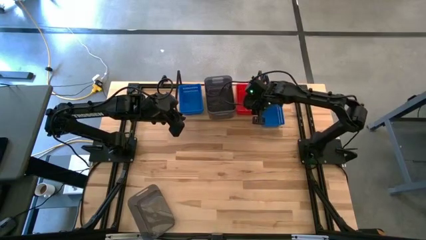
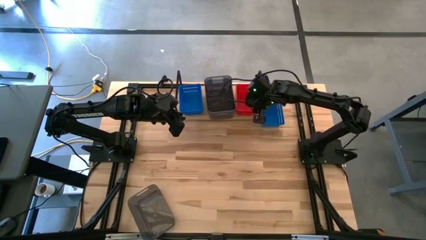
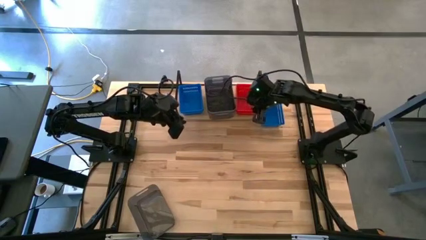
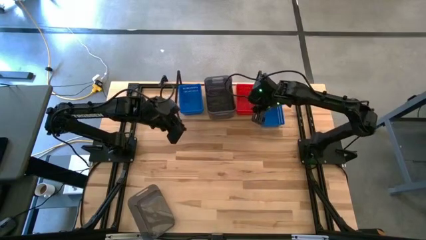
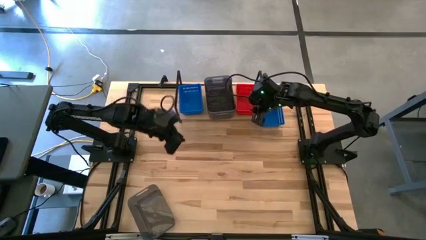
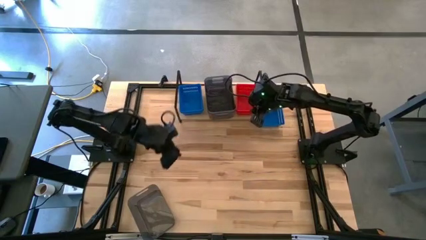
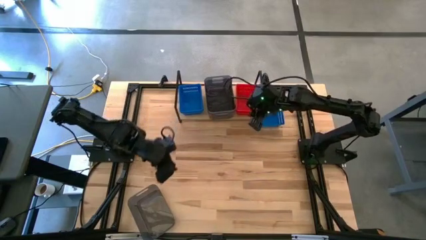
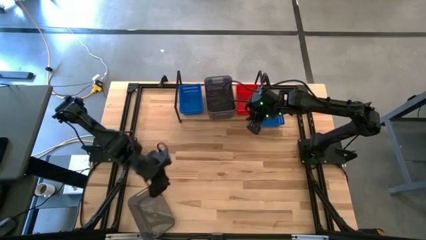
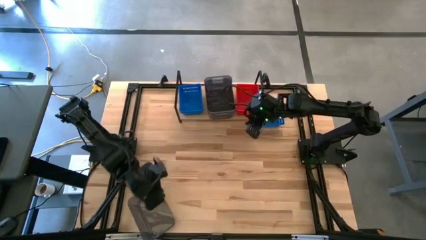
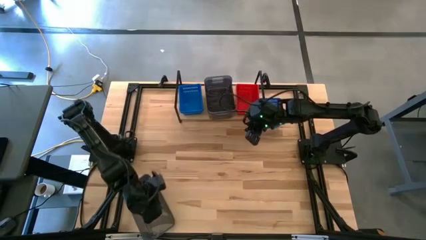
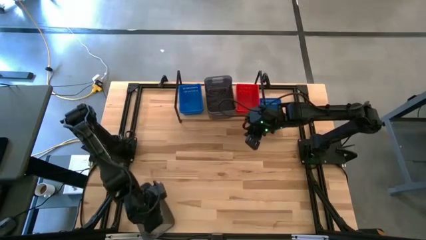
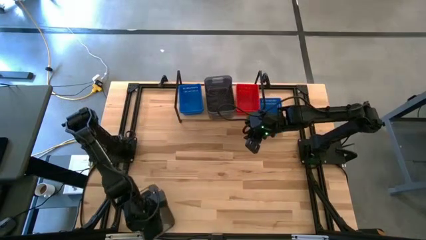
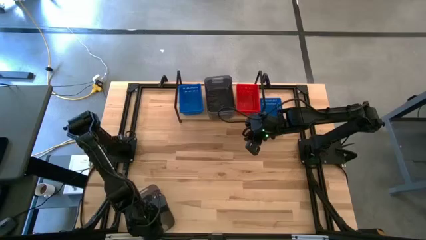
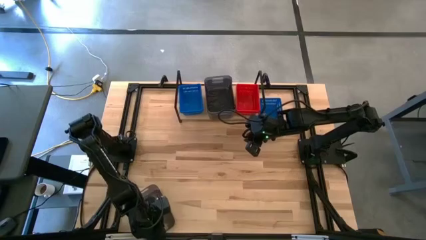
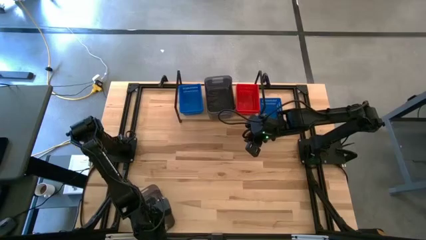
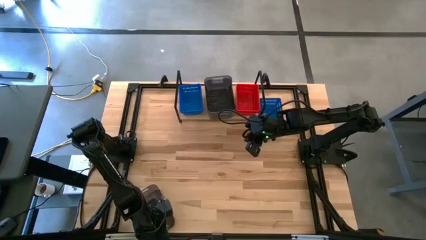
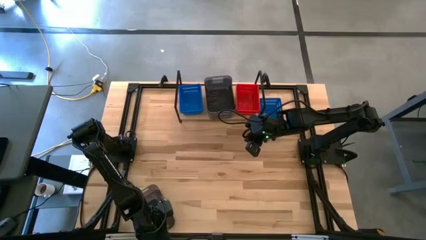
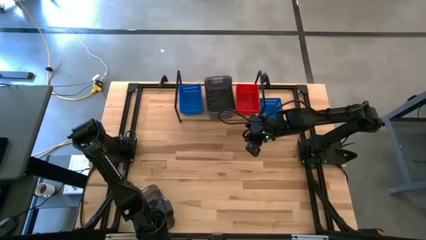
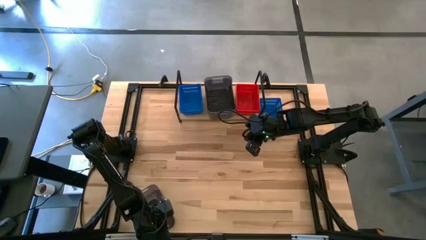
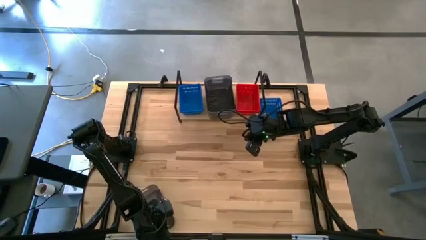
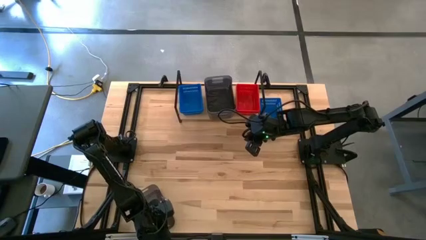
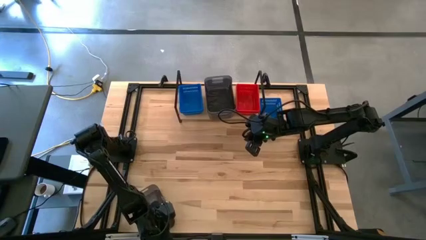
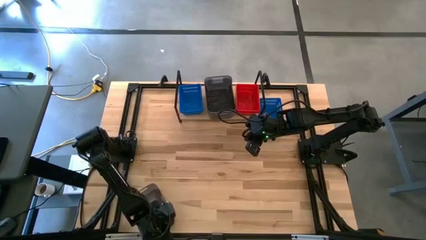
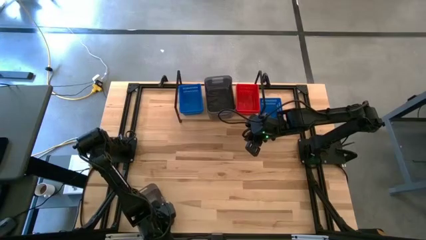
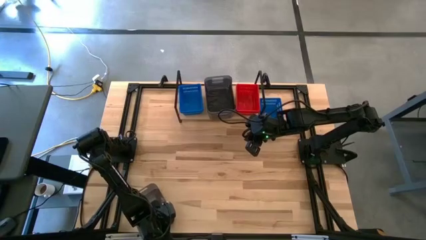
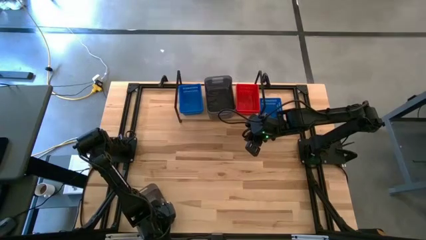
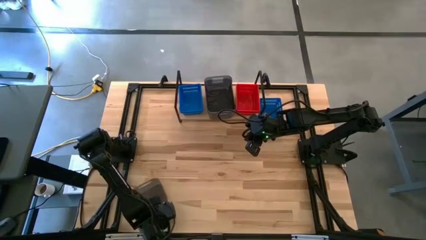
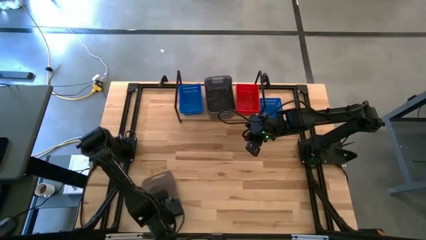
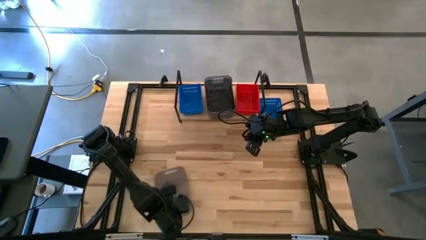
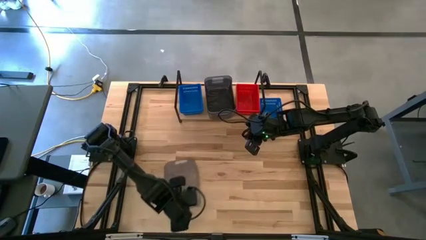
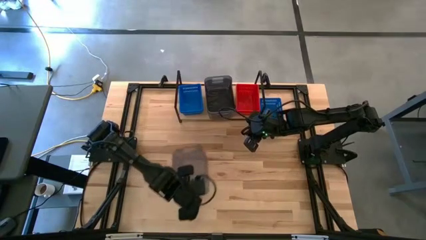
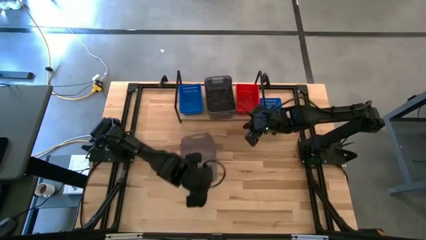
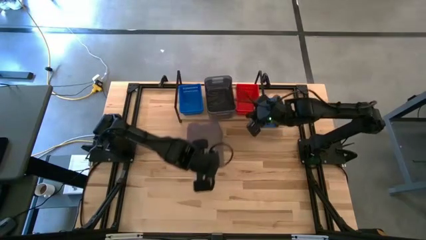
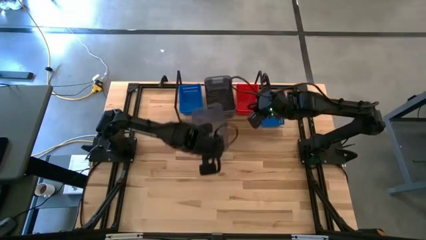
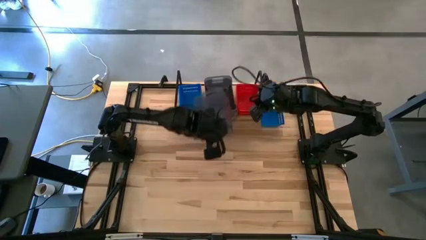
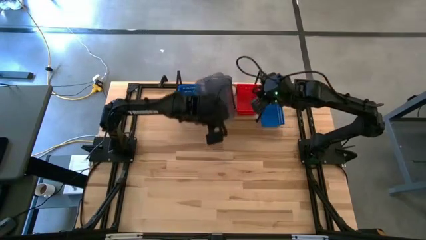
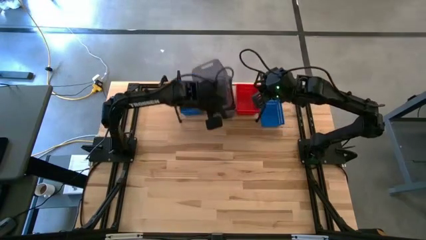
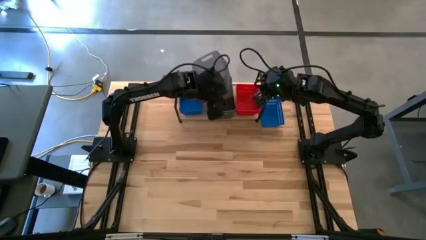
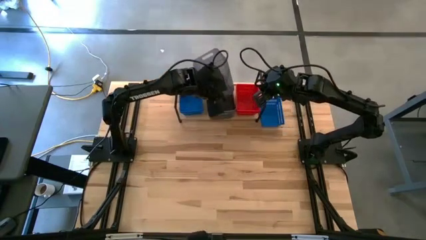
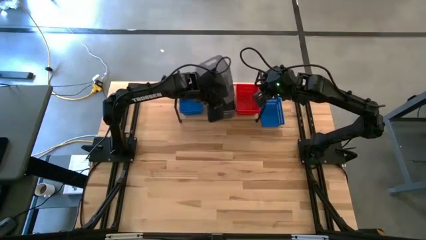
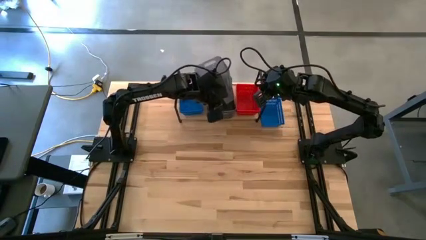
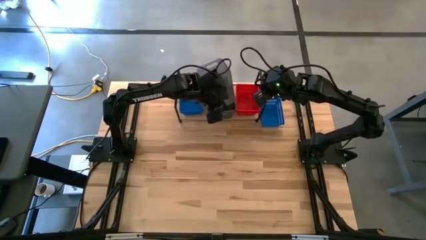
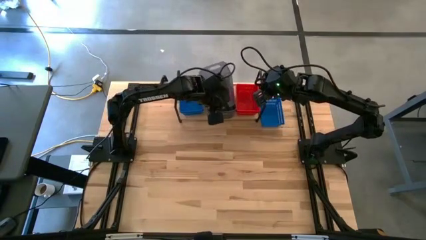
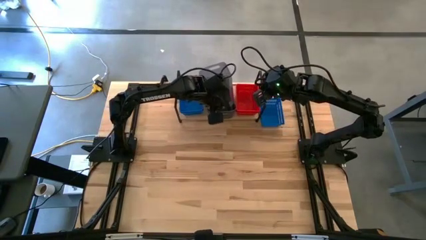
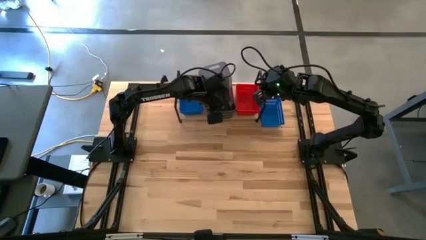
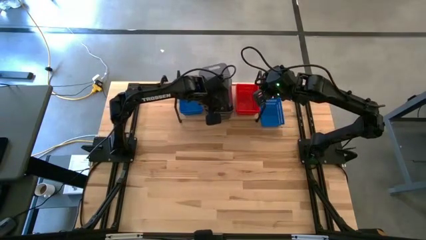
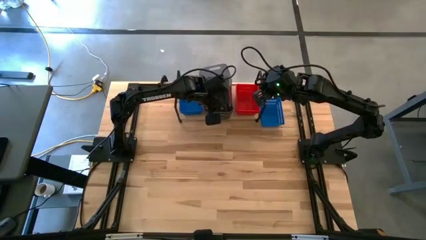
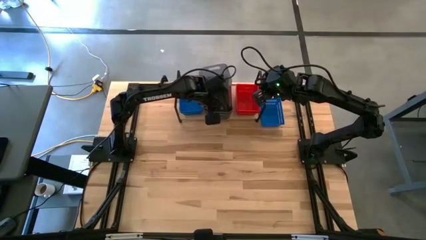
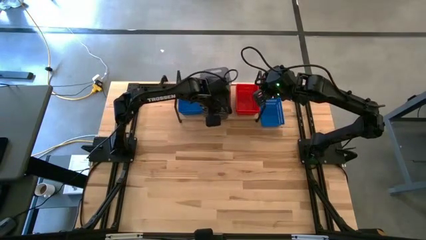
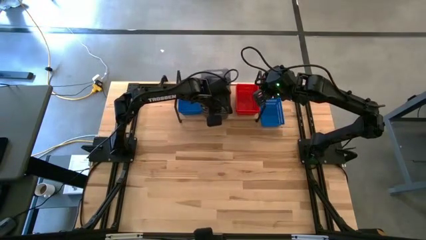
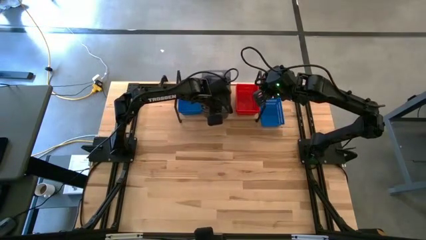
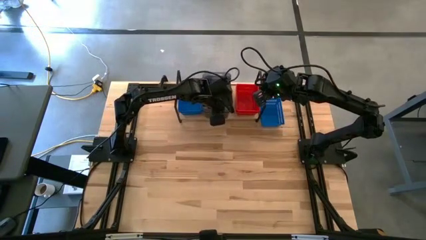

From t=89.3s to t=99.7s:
Task: Stack baskets on shelf by color
Stack the black bin on the black bin on the shelf

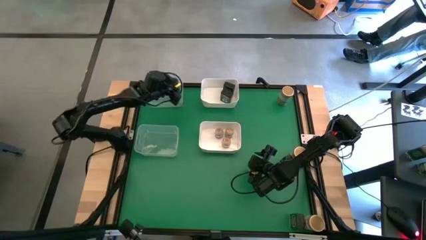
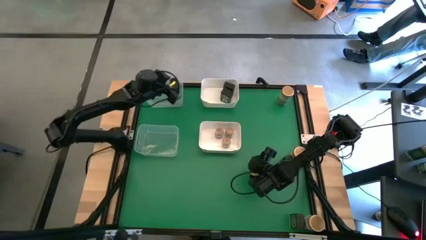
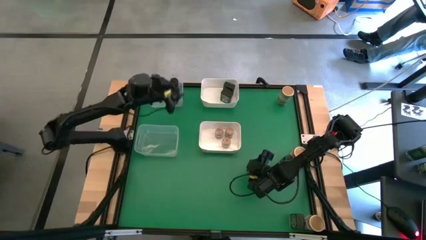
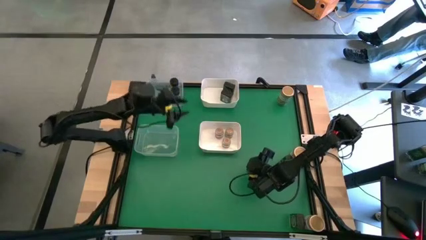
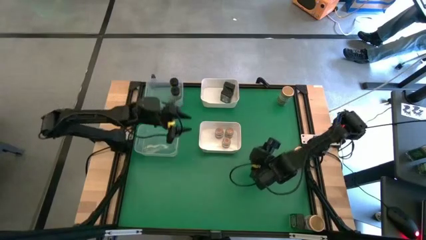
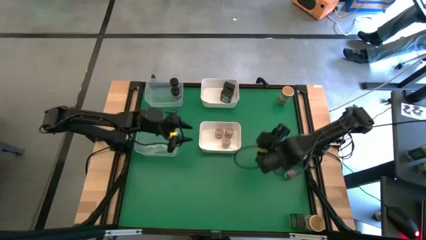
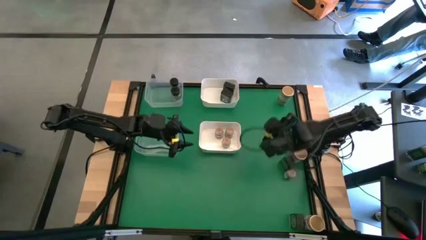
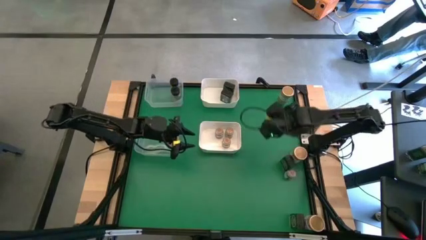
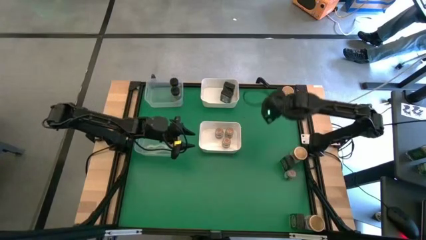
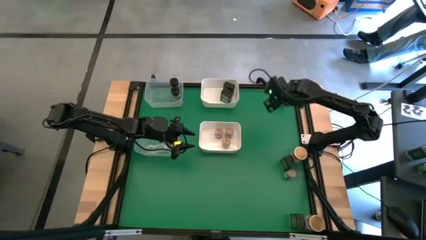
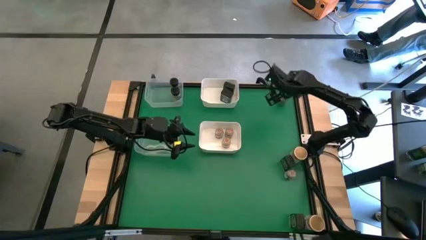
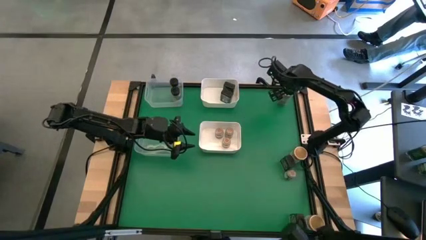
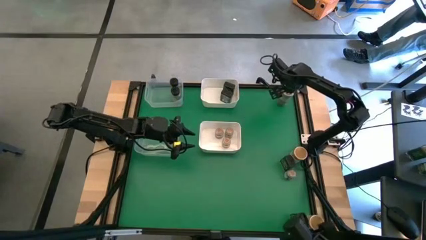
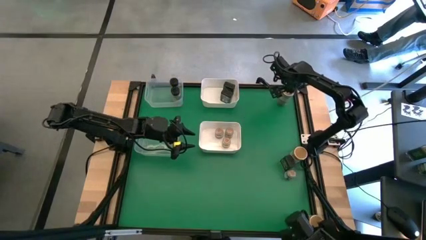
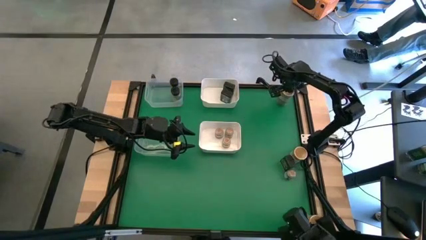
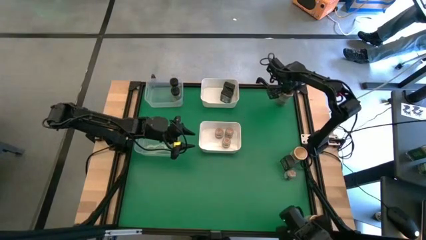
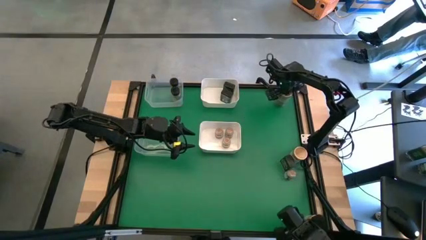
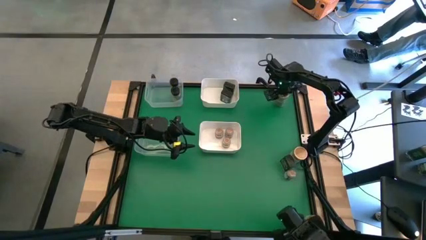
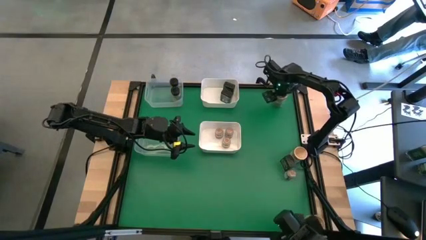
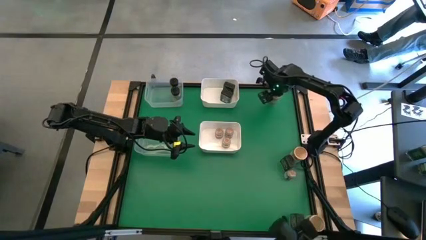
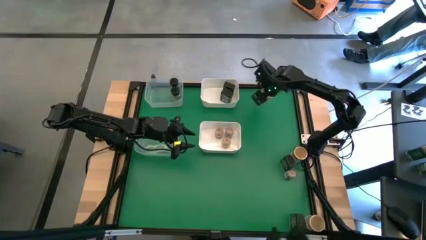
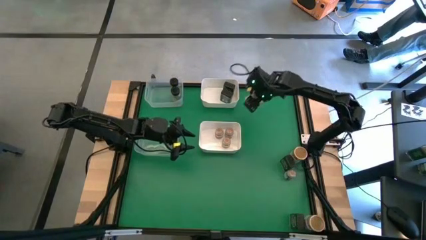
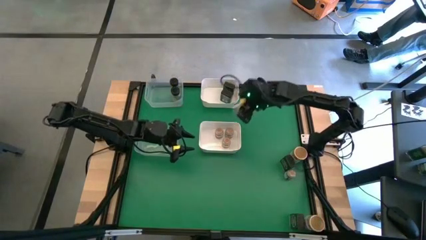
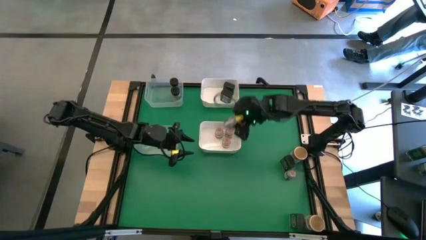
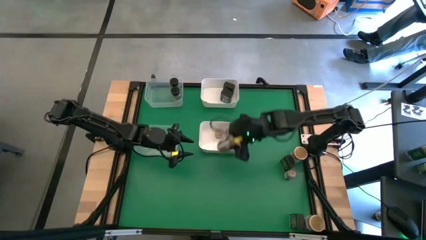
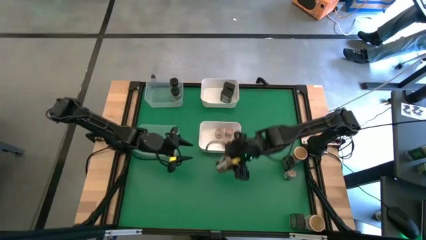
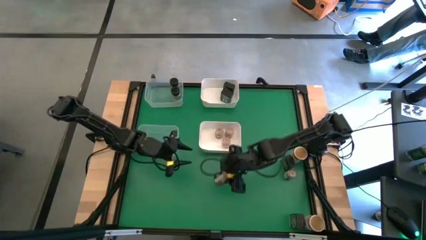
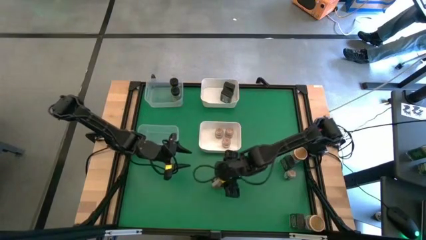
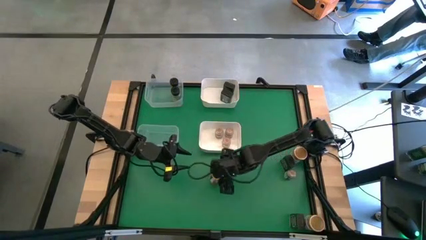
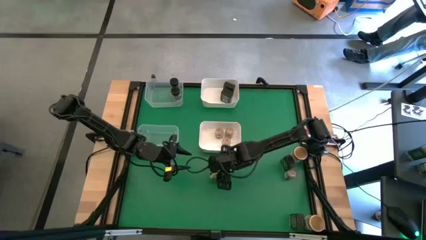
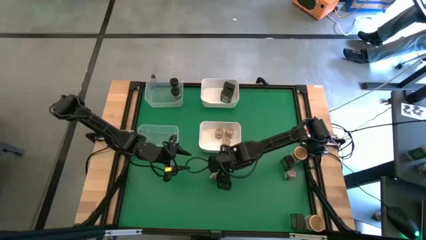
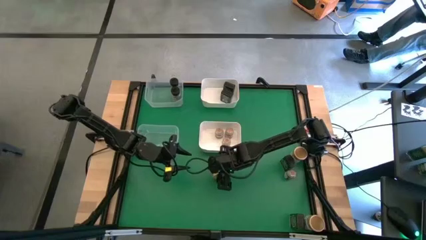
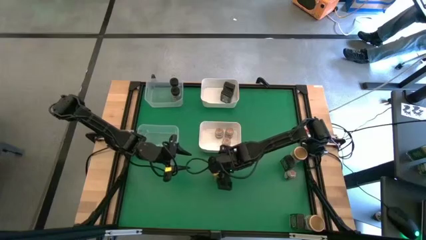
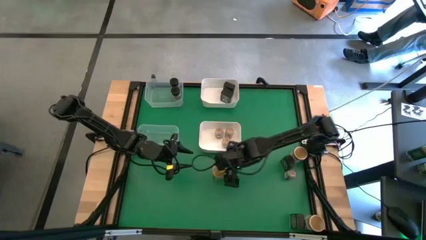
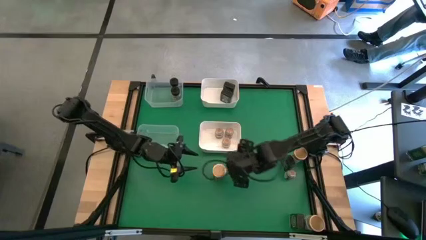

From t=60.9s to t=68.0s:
Task: Sort spices by type
Move the top light brown seasoning bottle to the center of the table
